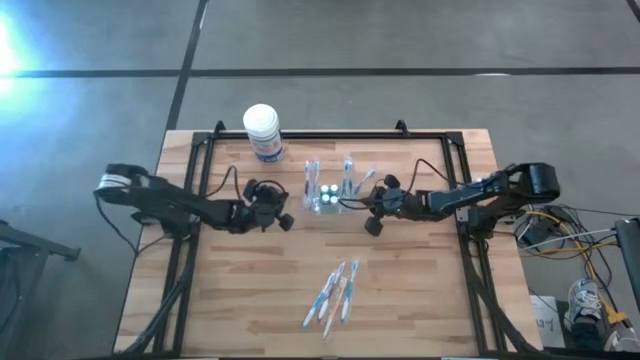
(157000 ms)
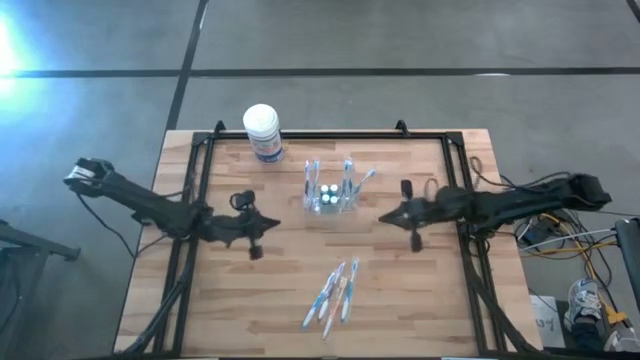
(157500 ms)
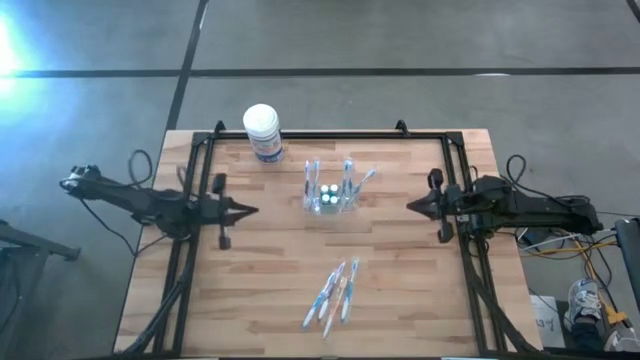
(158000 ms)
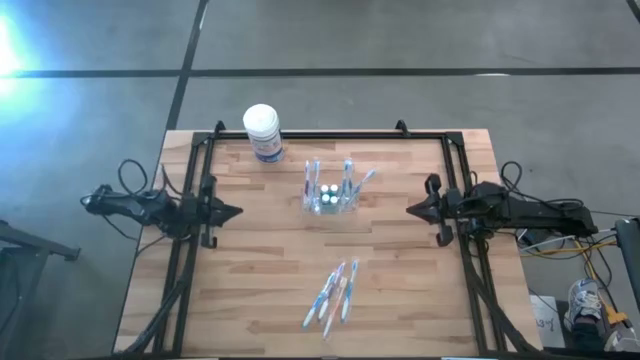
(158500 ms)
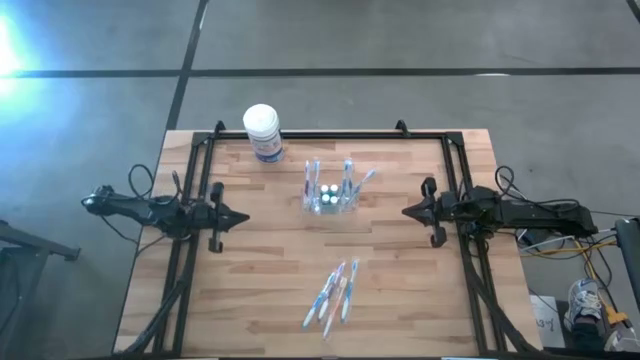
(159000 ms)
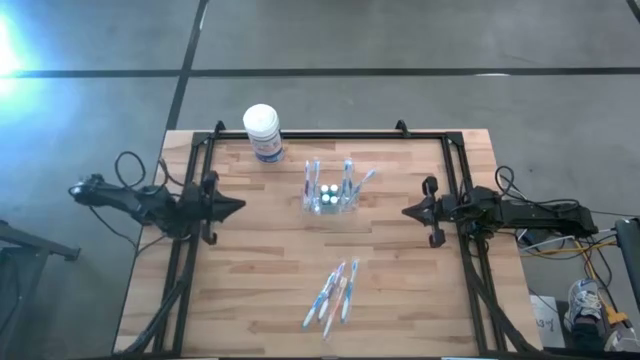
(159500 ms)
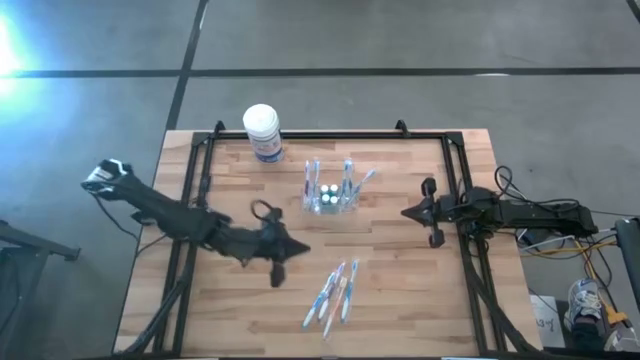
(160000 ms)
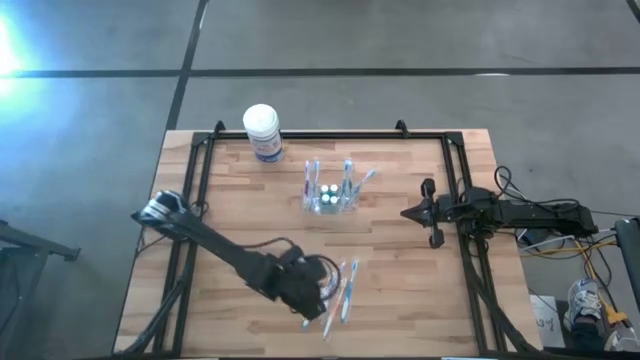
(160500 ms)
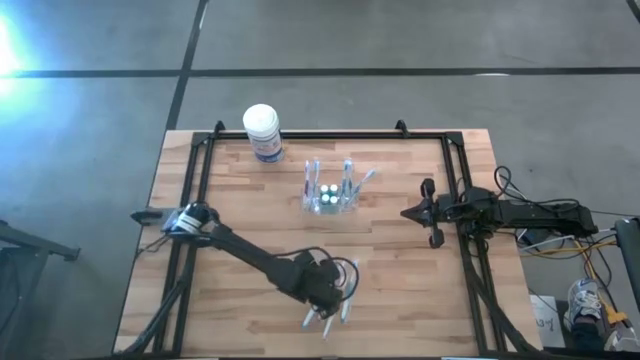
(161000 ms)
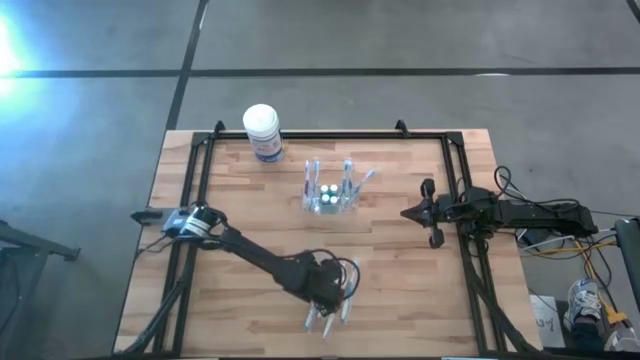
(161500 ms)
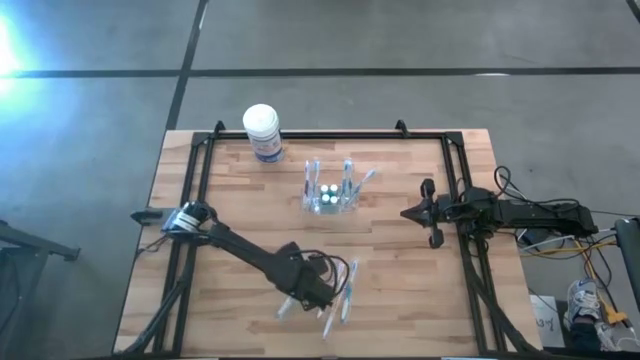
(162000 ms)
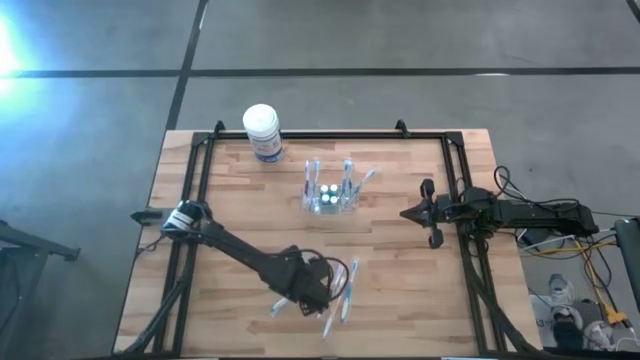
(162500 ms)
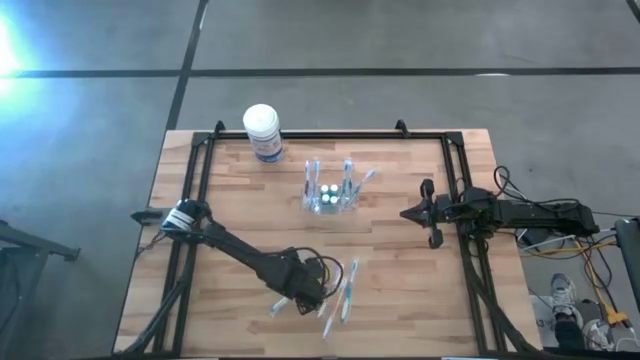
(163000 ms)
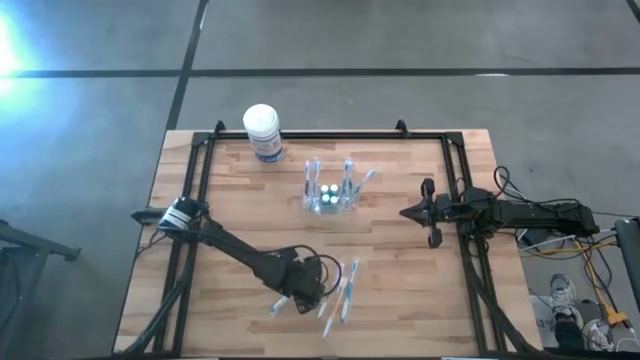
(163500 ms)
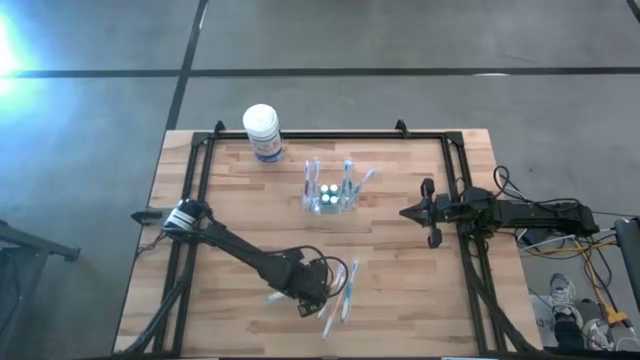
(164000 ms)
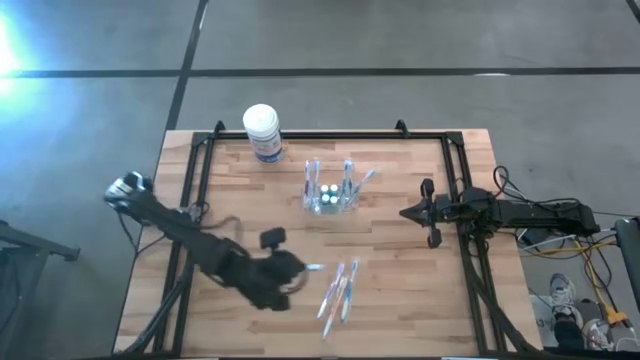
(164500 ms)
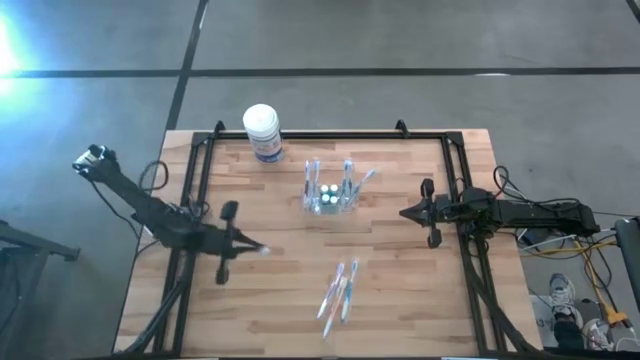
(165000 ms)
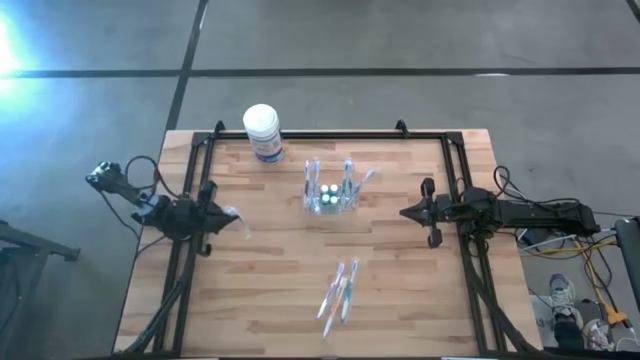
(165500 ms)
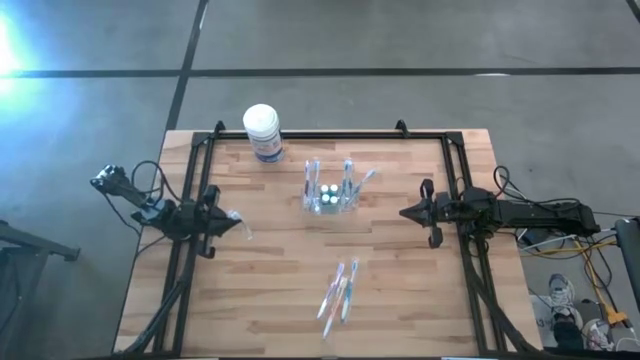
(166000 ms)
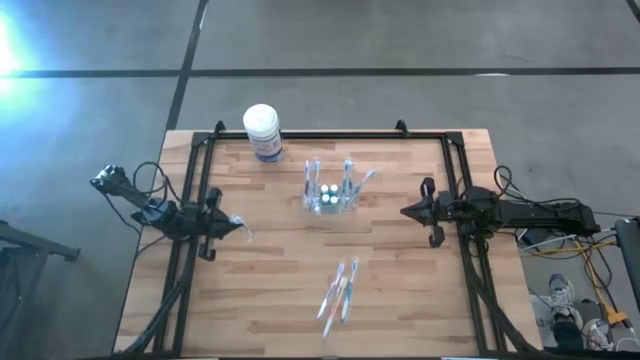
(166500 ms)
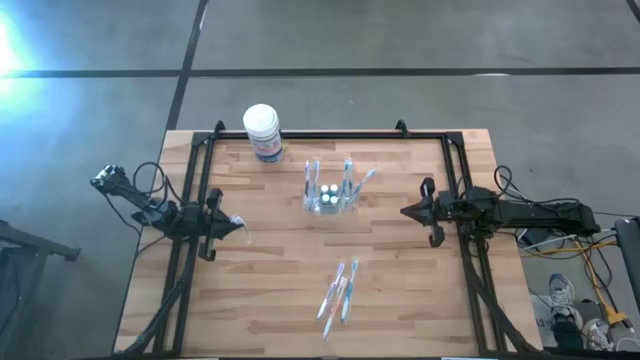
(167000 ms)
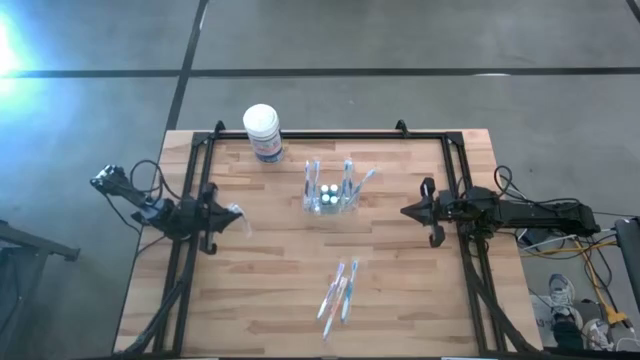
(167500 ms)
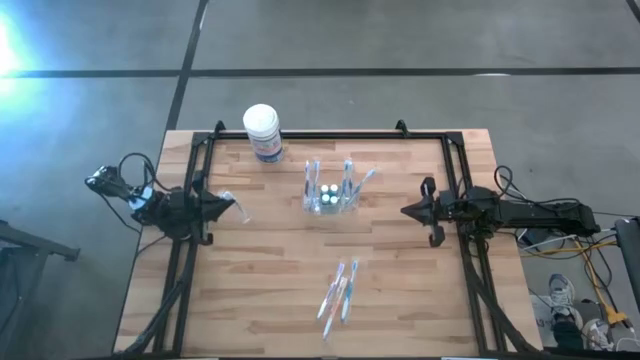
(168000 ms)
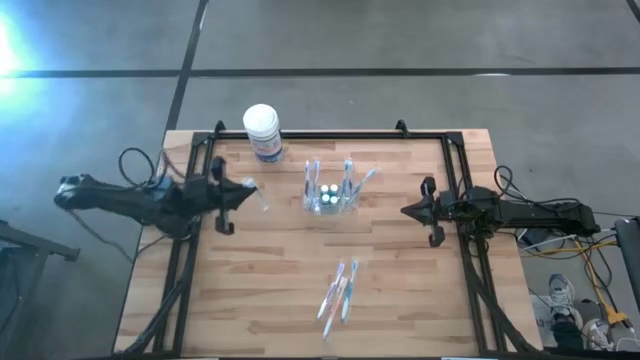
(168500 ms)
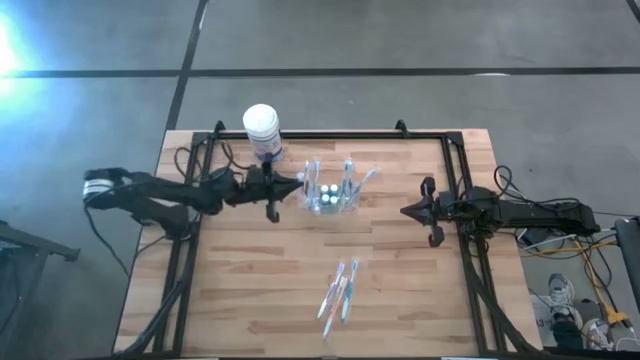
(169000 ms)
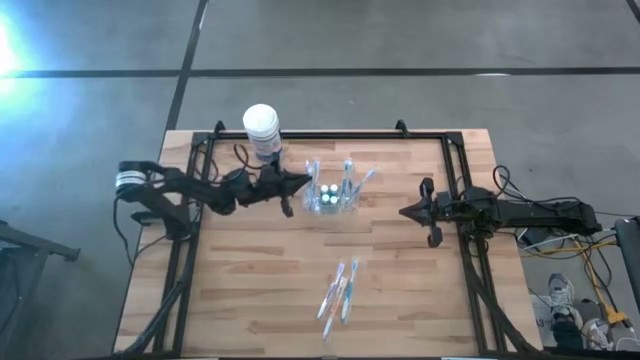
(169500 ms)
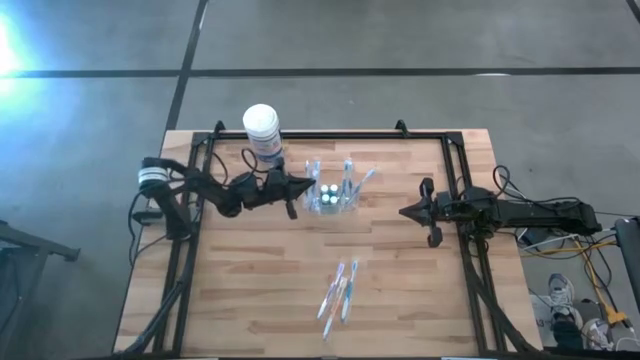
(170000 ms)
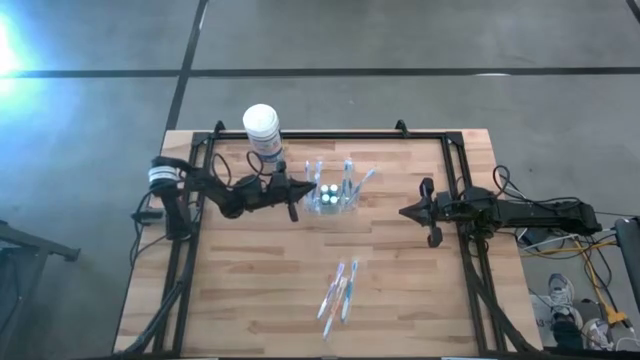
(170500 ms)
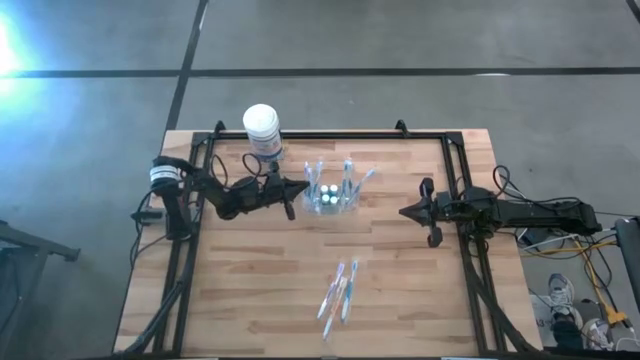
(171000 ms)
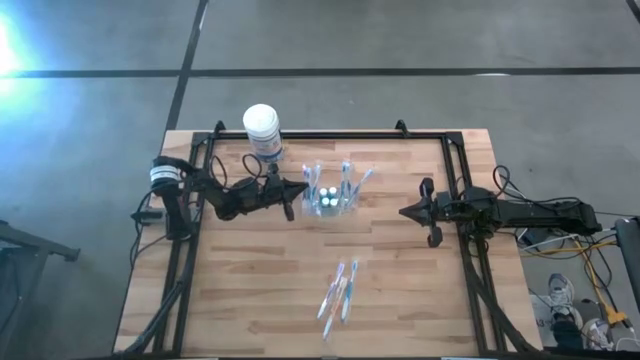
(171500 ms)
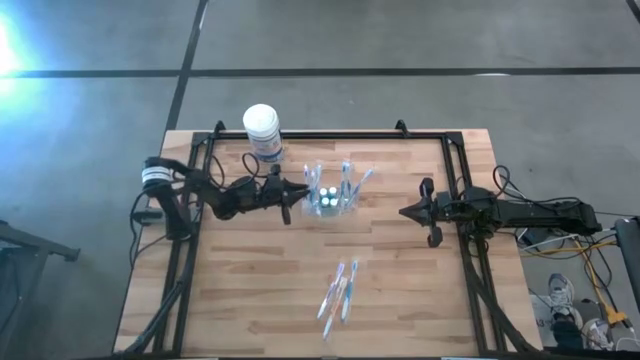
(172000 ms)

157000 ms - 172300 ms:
Task: Pick & Place toothbrushing station
Put the blue toothbrush into the transparent bin organizer

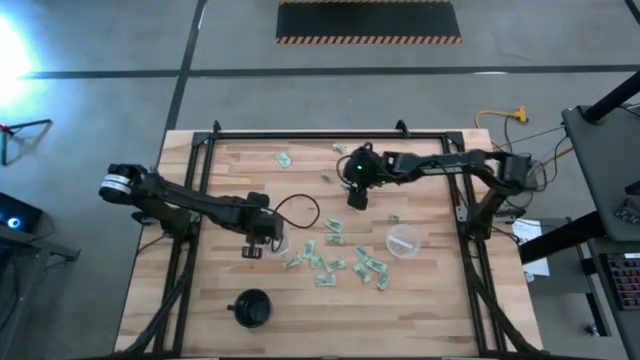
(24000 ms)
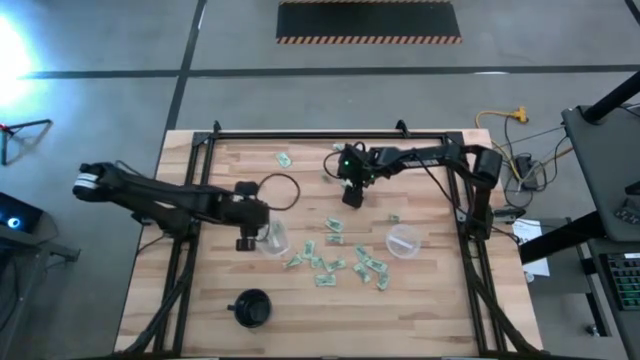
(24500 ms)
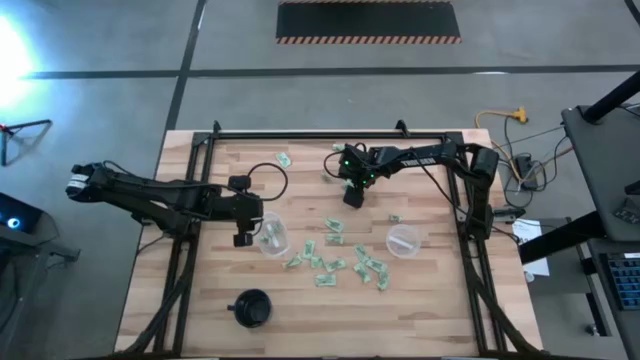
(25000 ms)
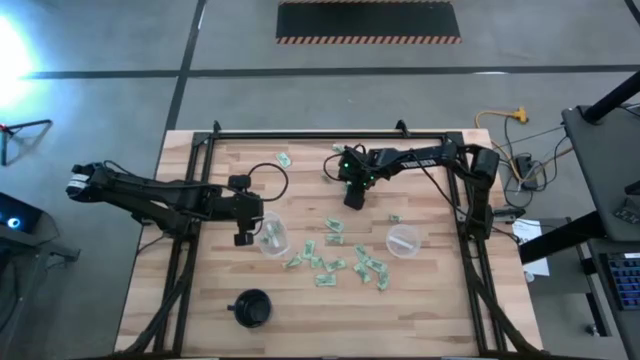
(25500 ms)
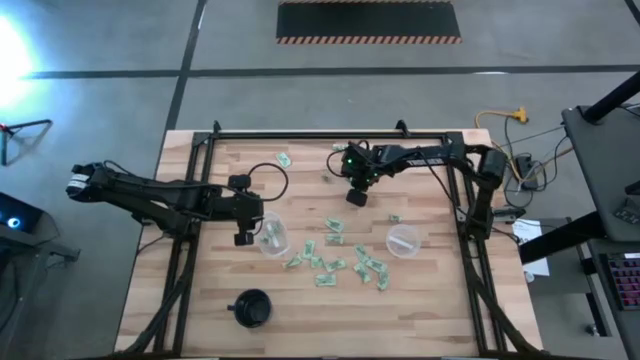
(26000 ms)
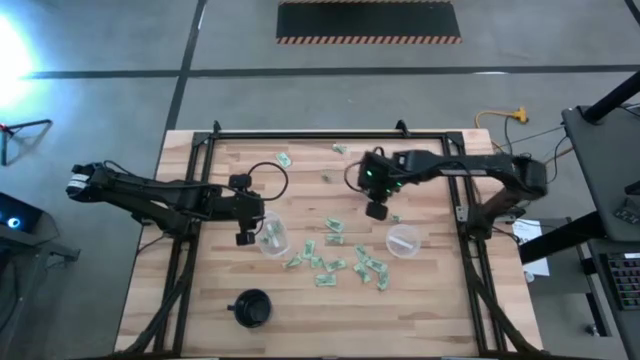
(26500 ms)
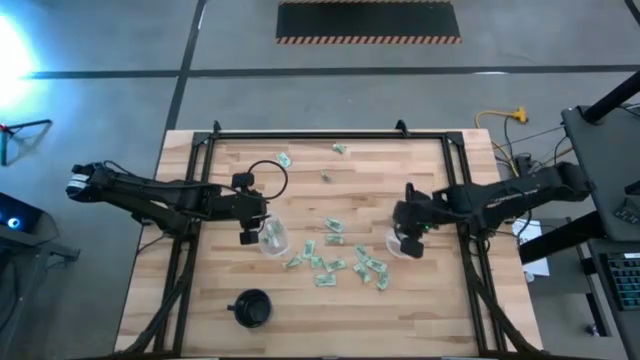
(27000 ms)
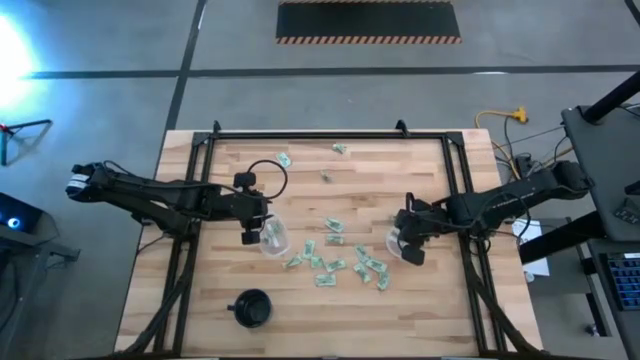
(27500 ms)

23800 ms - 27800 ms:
Task: Pick and place Stevia / Truvia into bins
Put the stevia packet into the round transparent container

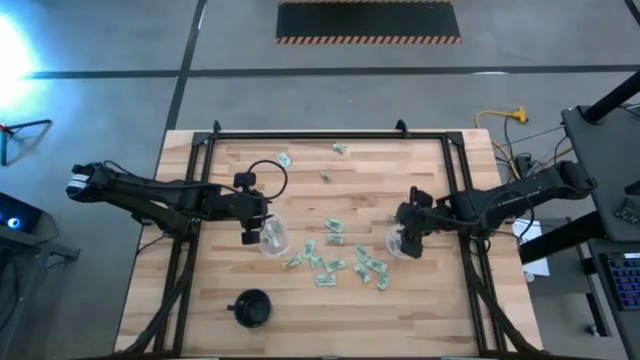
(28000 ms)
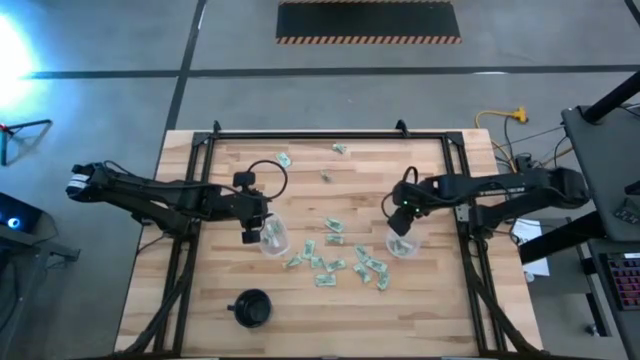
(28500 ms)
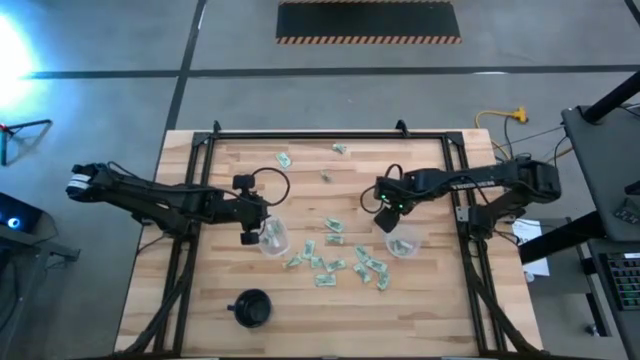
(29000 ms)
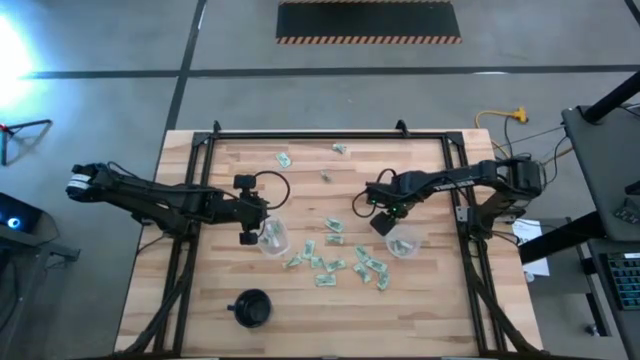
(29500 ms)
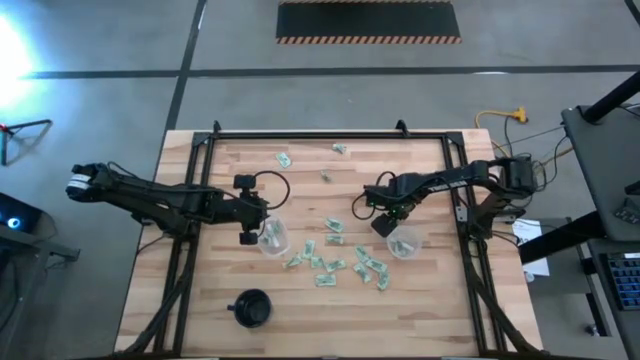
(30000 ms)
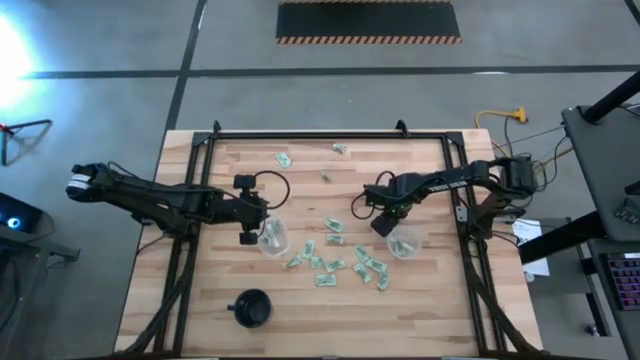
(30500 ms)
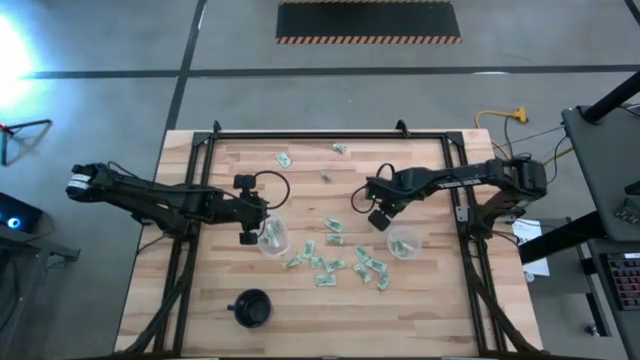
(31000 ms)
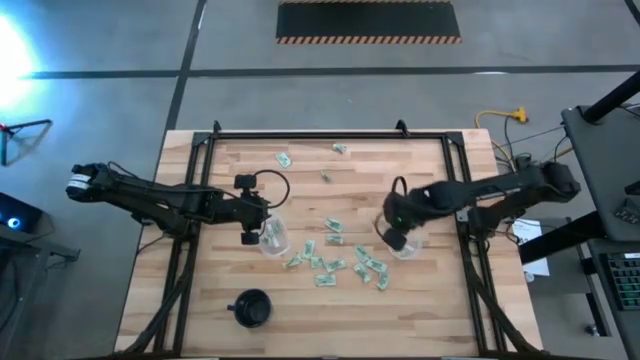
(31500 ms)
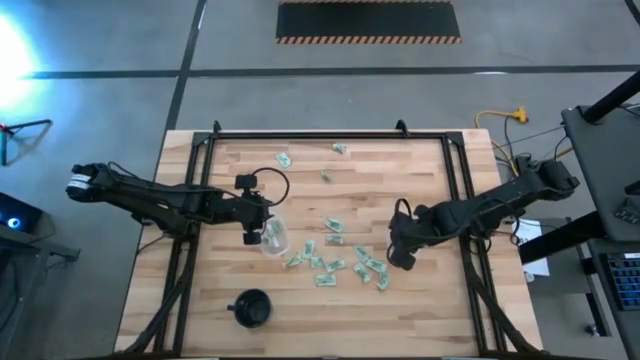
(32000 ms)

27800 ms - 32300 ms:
Put the stevia packet into the round transparent container
